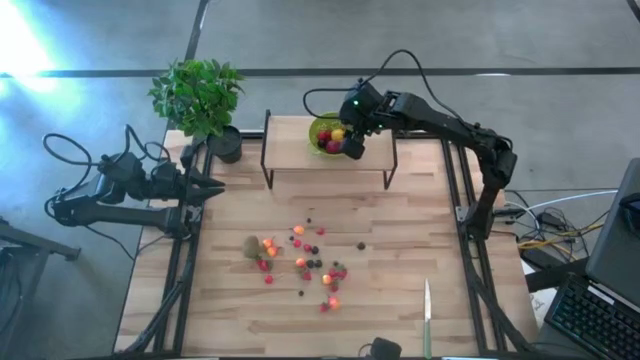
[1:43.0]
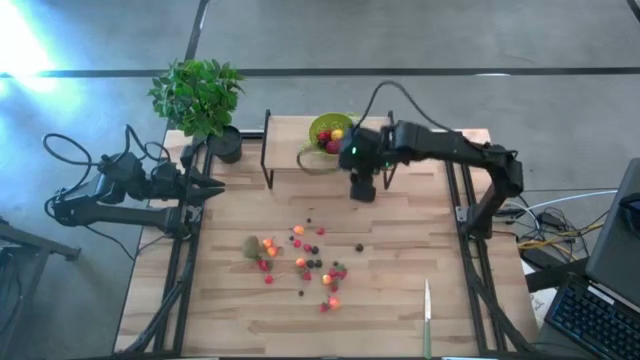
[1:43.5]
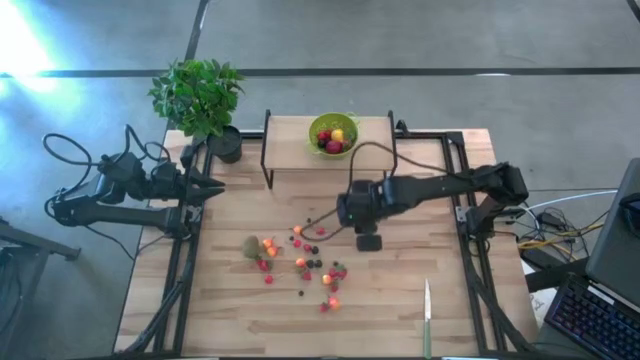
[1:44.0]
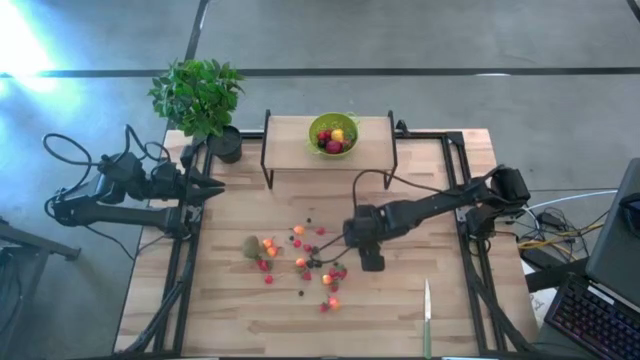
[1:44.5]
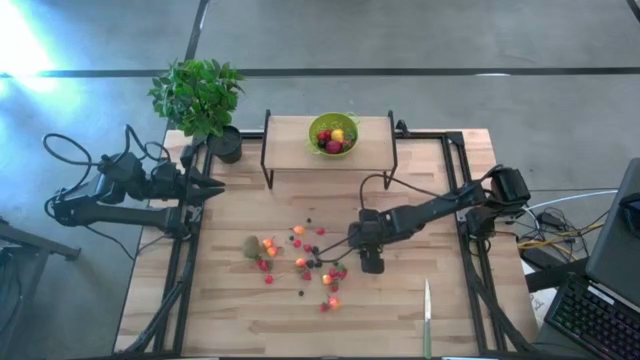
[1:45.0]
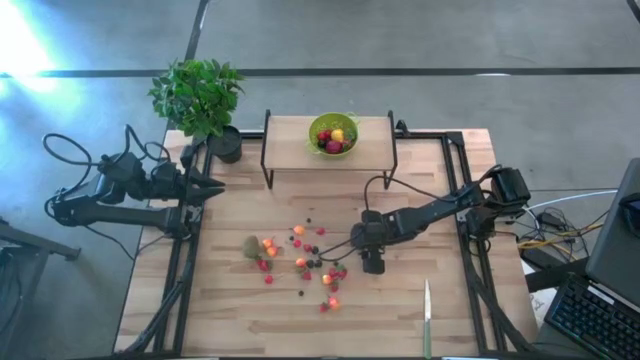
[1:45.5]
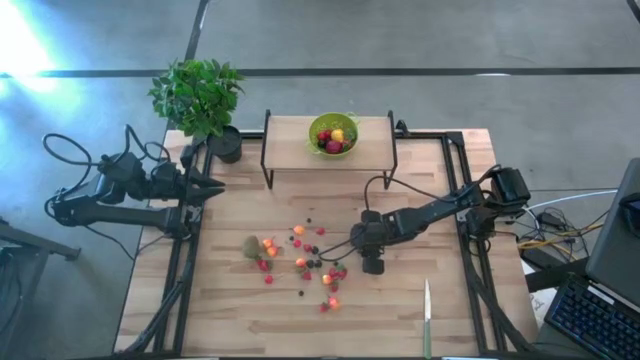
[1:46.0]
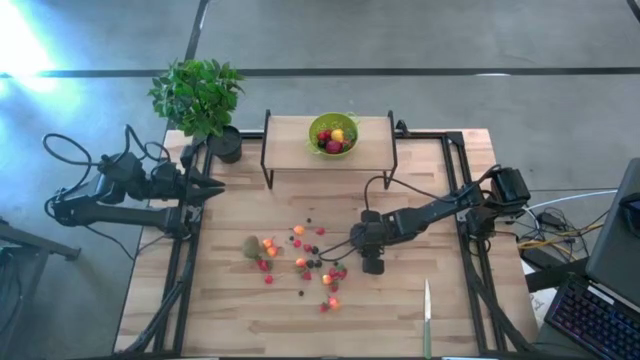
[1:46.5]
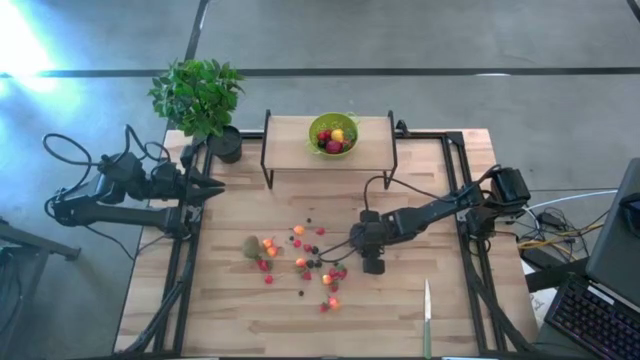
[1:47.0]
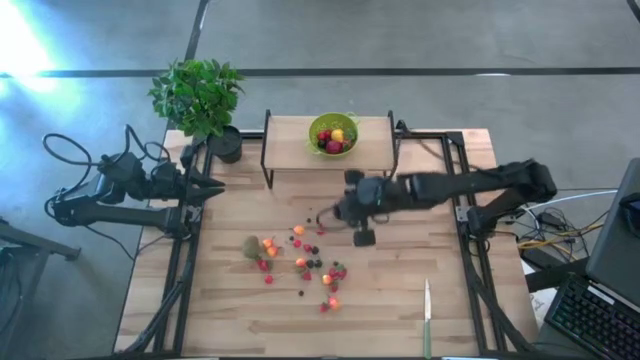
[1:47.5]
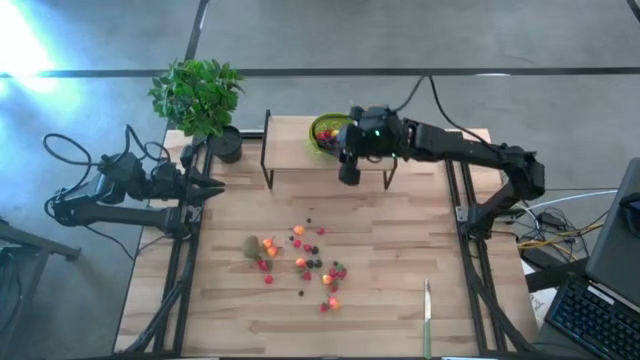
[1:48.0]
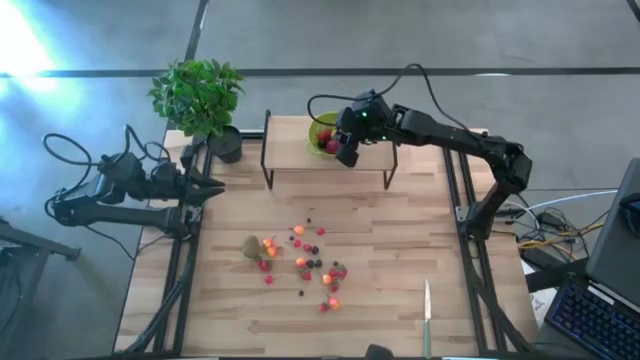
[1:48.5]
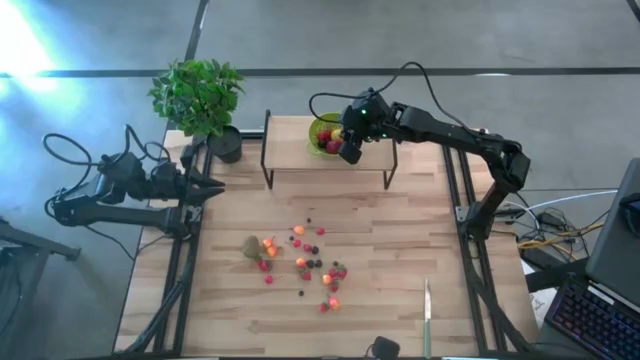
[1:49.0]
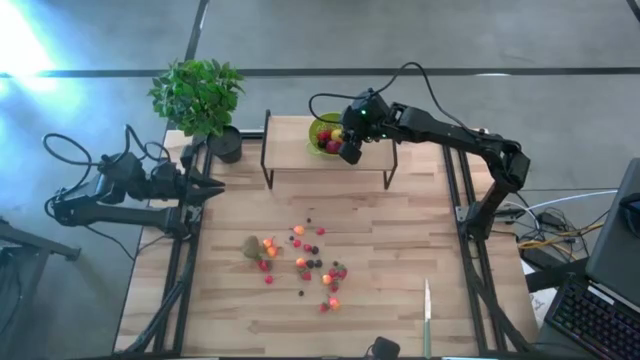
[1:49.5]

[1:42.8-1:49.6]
Task: Pick & Place Fruit
Put the black cherry into the green strainer bowl on the shelf

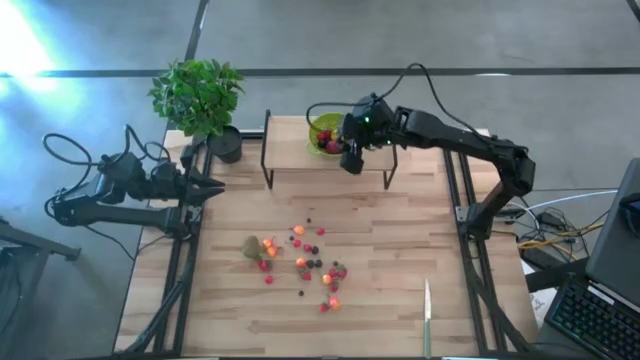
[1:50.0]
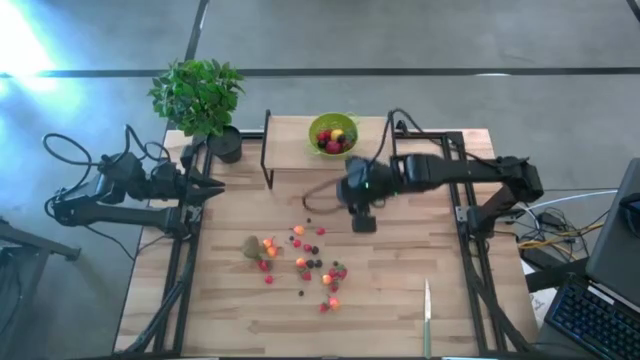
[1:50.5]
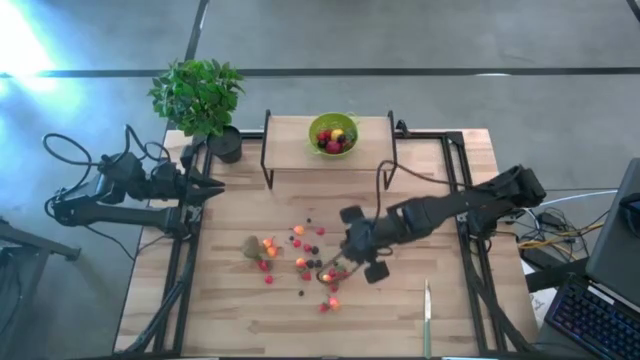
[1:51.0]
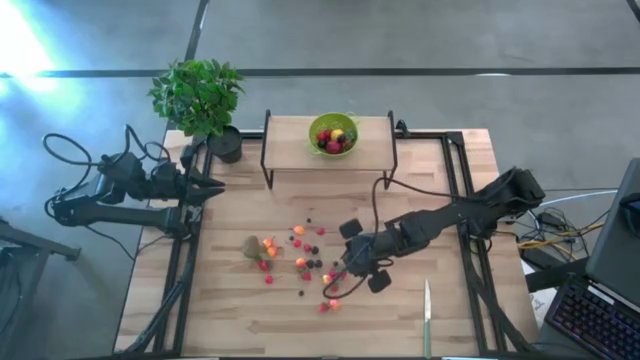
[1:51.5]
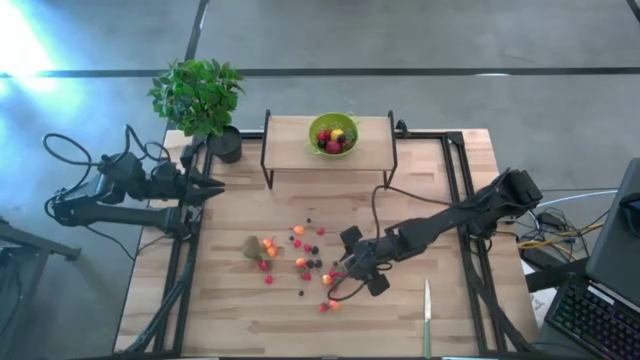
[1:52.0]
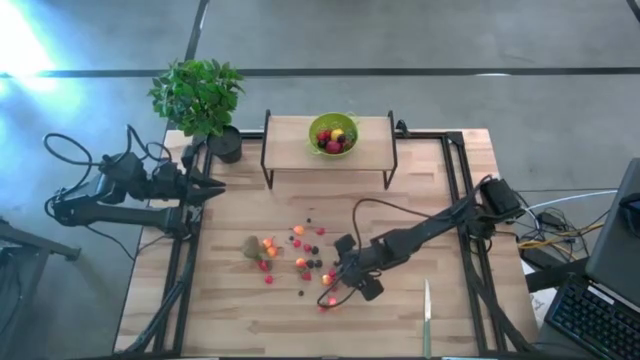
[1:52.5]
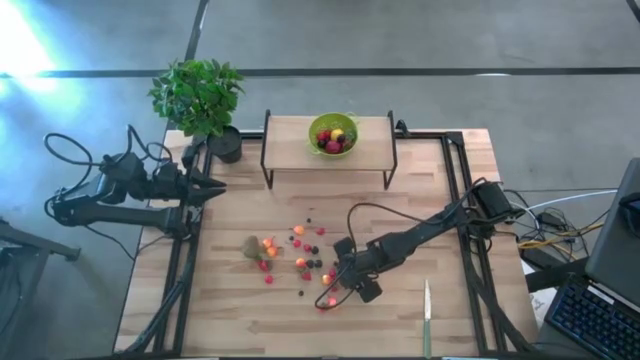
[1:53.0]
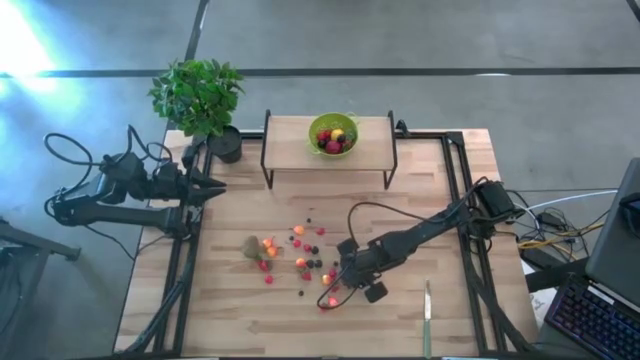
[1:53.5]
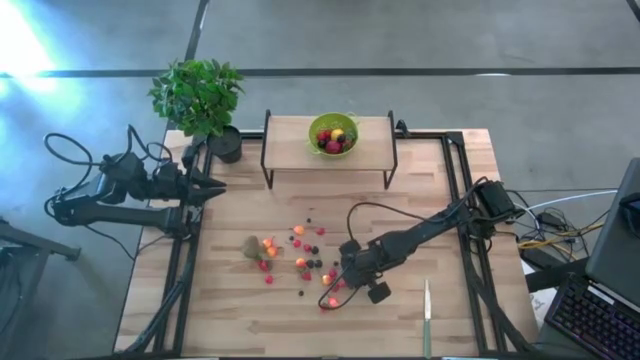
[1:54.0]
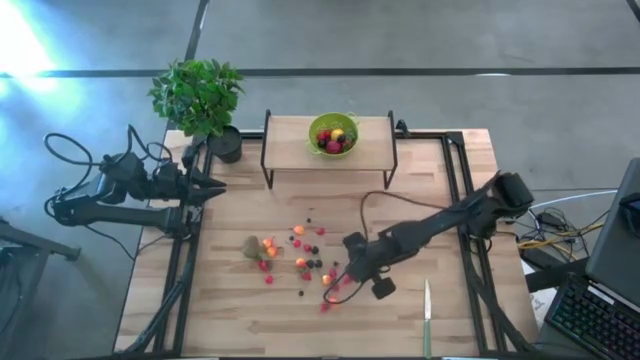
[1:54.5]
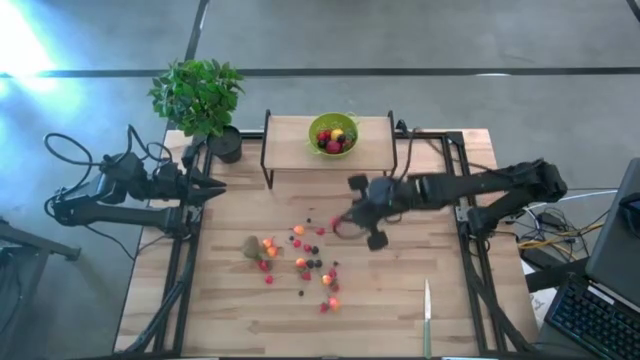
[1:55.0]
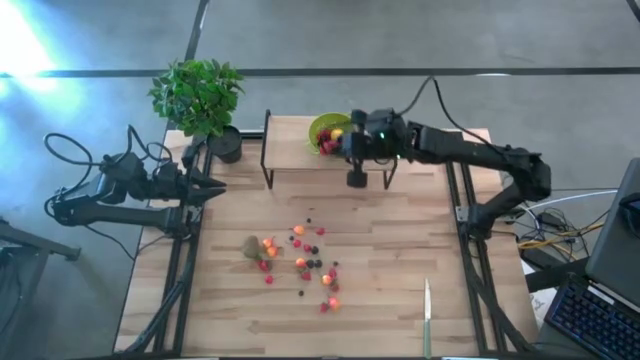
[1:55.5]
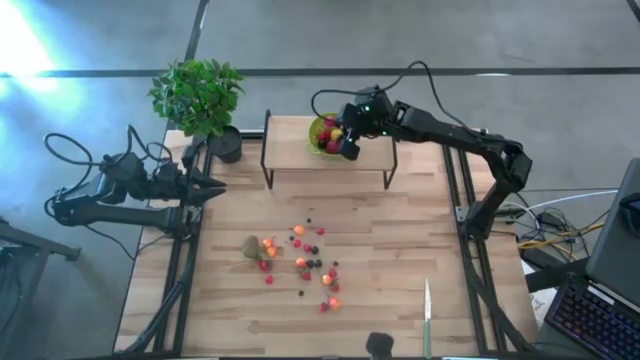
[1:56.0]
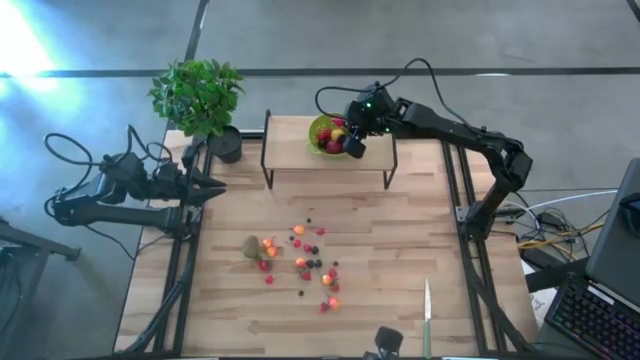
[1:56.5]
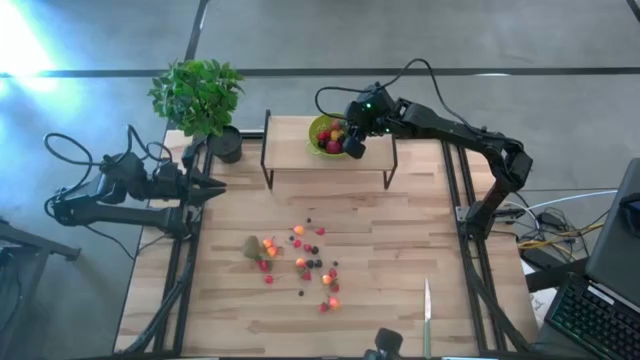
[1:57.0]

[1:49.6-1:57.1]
Put the red strawberry into the green strainer bowl on the shelf

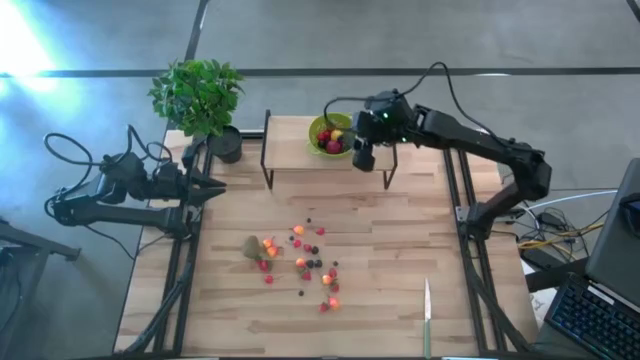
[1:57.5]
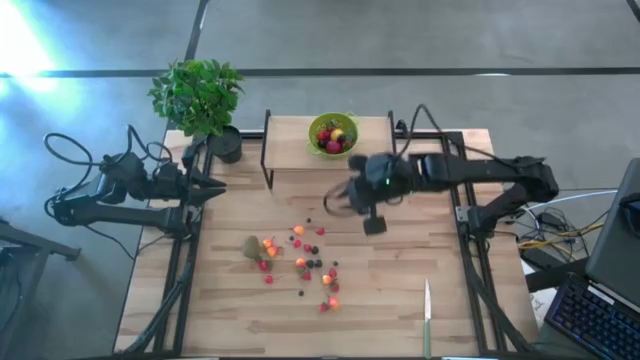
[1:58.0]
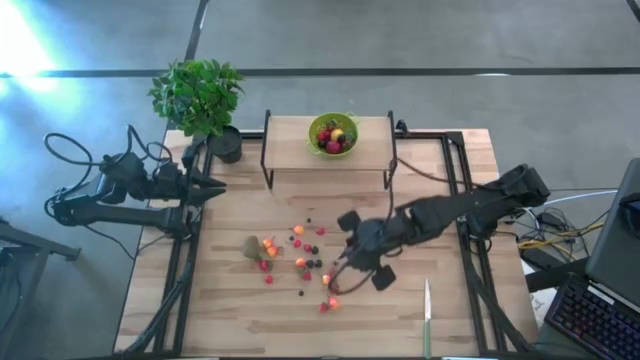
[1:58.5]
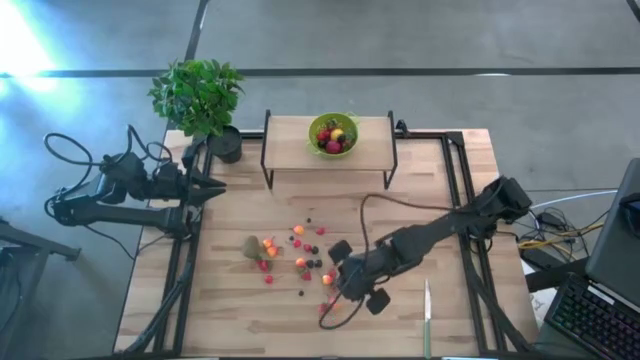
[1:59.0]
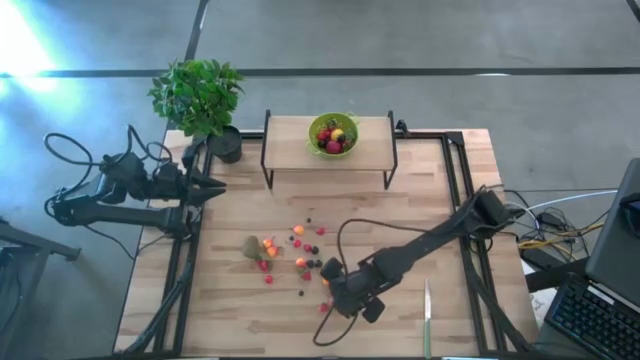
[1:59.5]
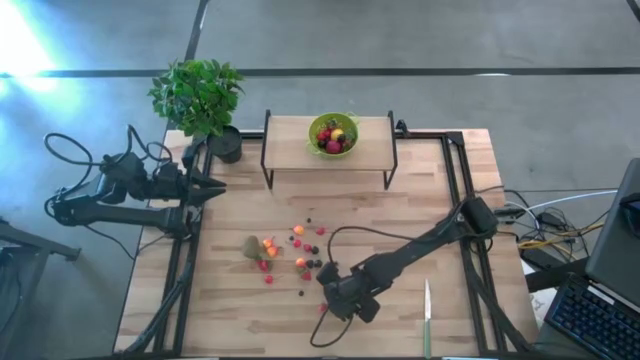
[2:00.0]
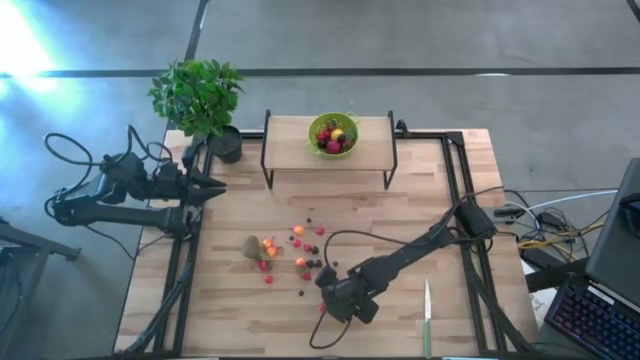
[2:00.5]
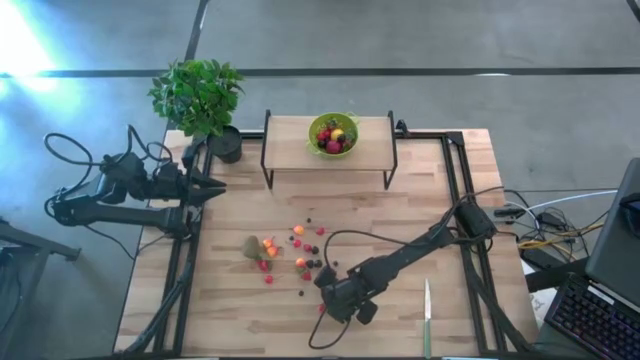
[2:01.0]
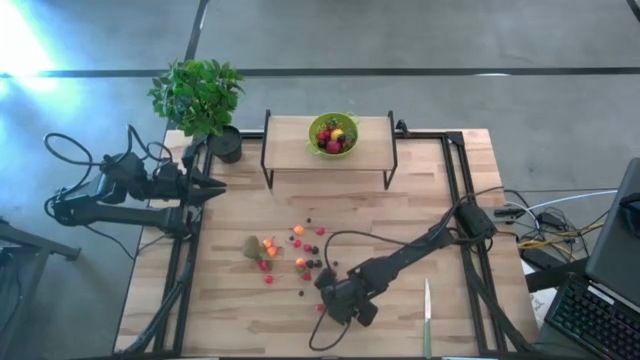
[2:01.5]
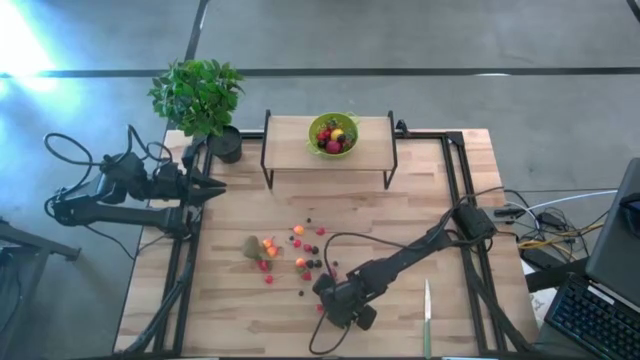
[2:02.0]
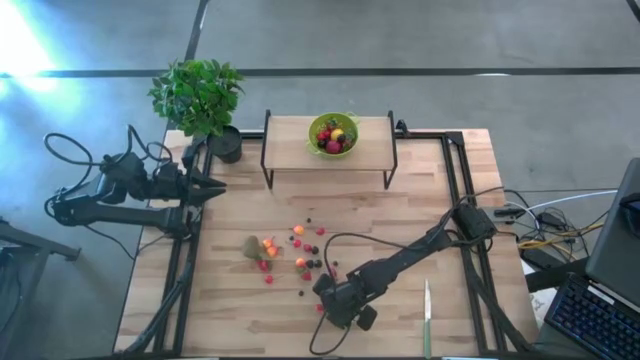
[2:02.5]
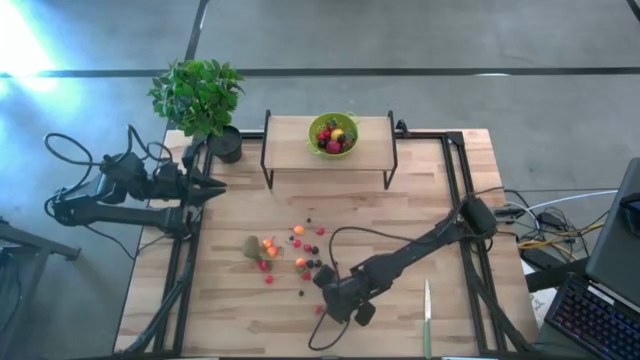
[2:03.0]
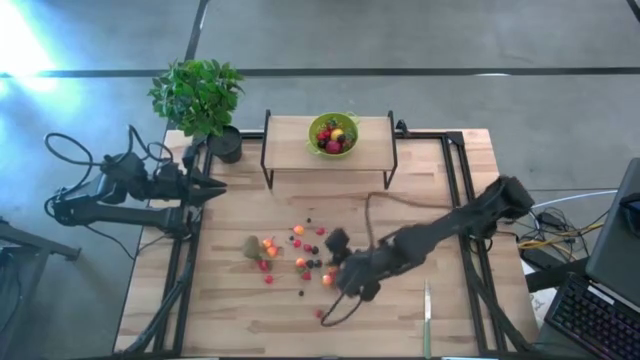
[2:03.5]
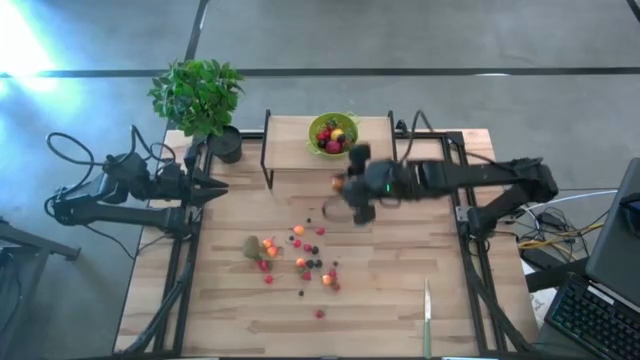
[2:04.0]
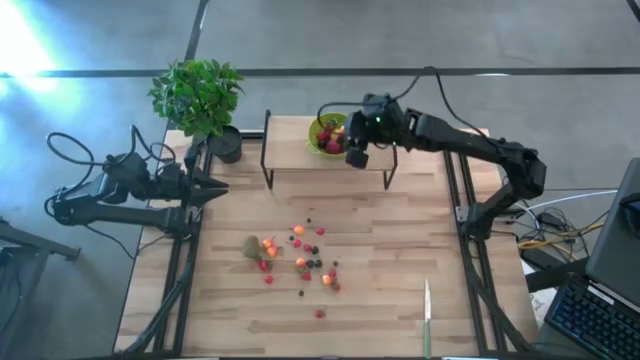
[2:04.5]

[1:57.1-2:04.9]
Put the yellow peach into the green strainer bowl on the shelf
